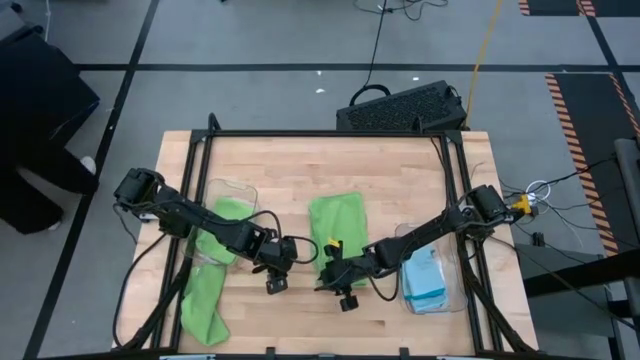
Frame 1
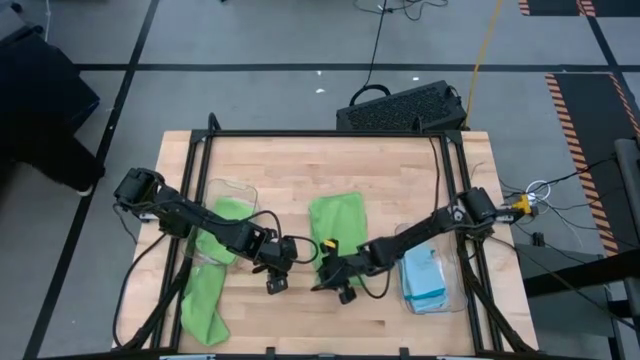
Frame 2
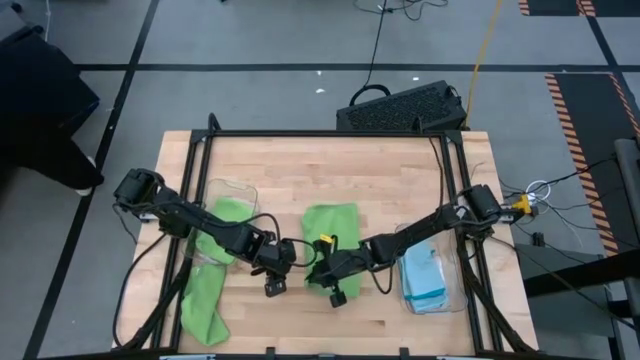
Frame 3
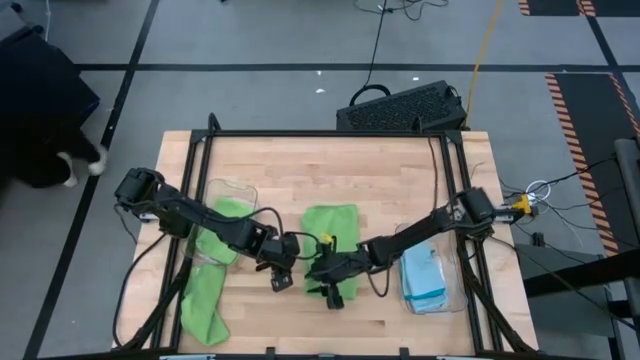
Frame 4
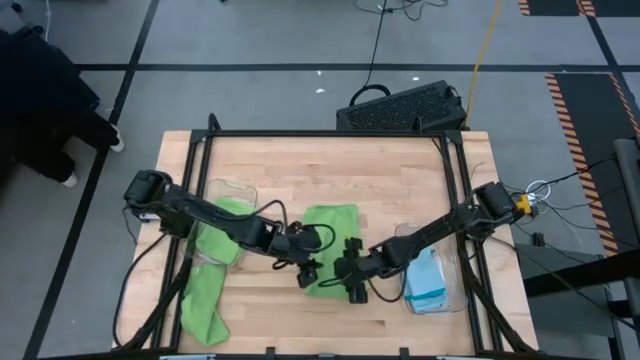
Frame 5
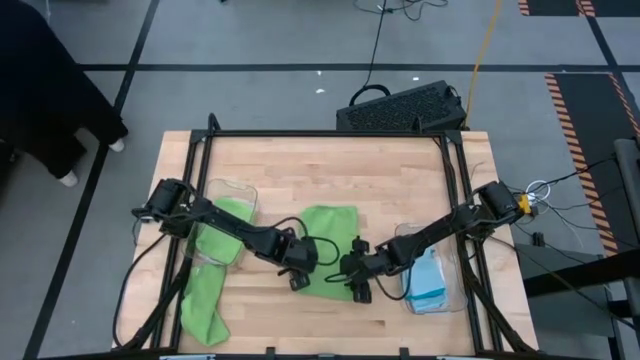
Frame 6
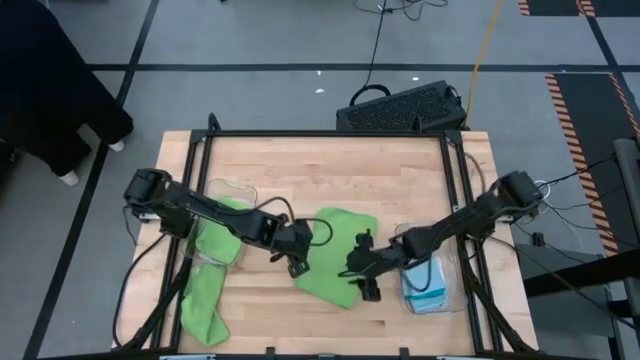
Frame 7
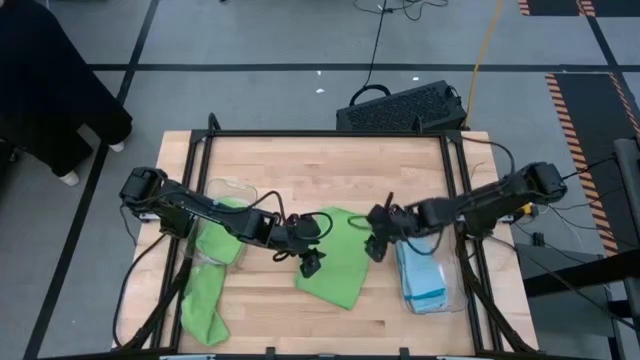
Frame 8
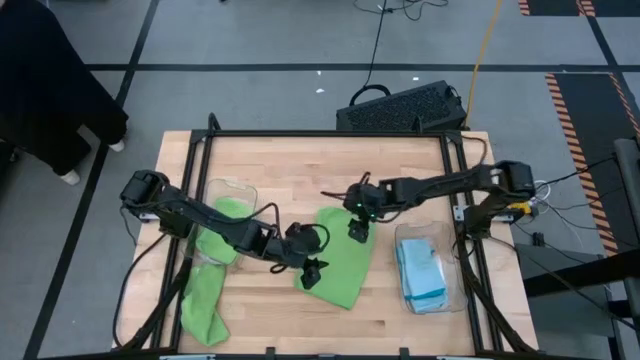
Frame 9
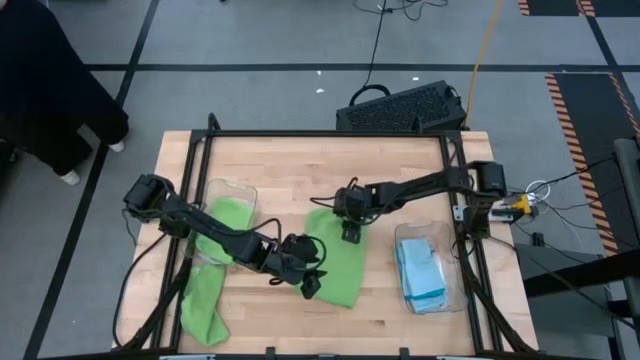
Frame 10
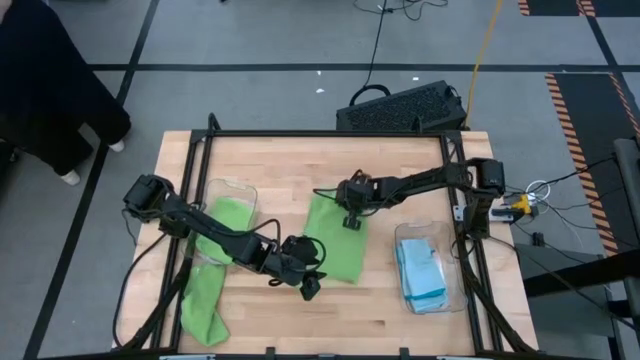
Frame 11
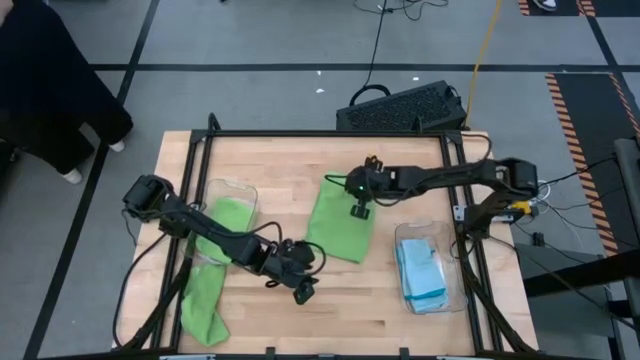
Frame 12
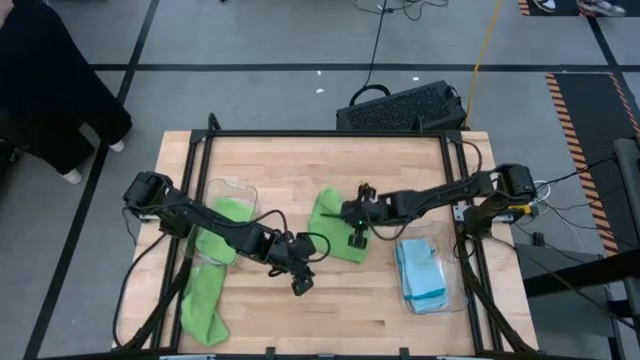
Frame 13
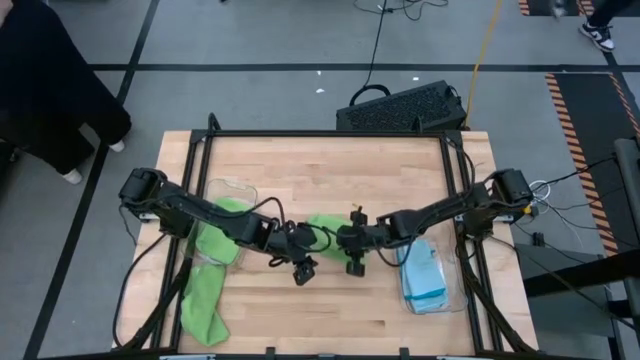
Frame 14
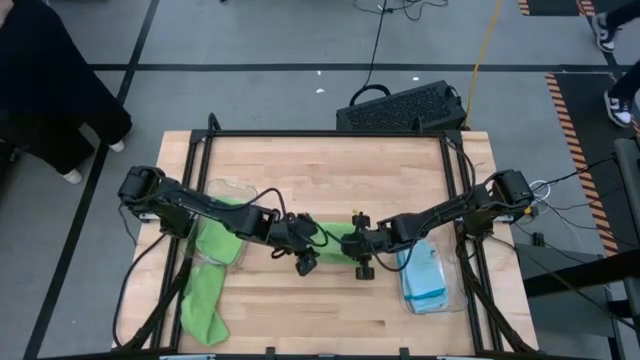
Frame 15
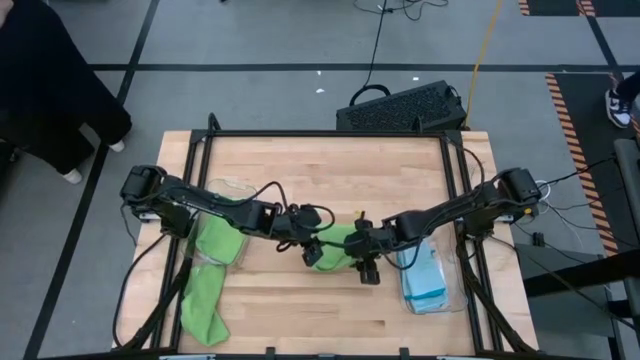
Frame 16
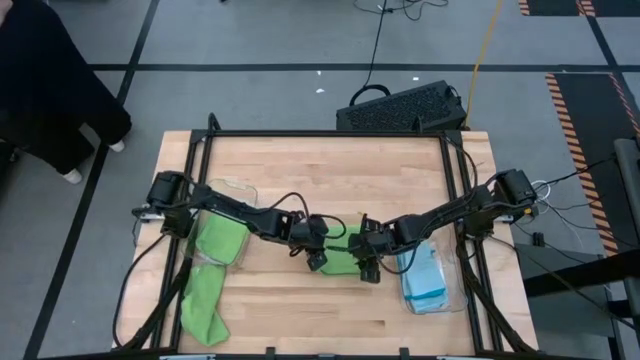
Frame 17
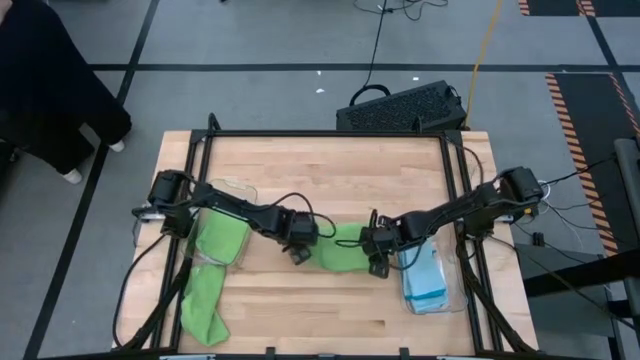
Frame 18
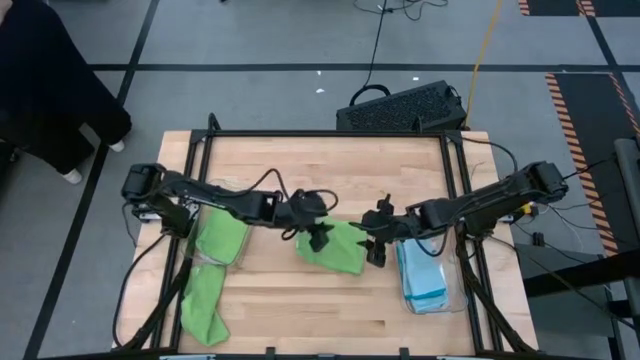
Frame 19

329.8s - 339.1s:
Task: Sort microfiber towel by color & place in baskets
Fold the right green microfiber towel

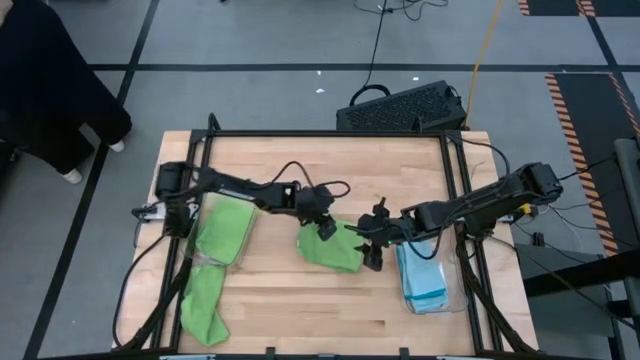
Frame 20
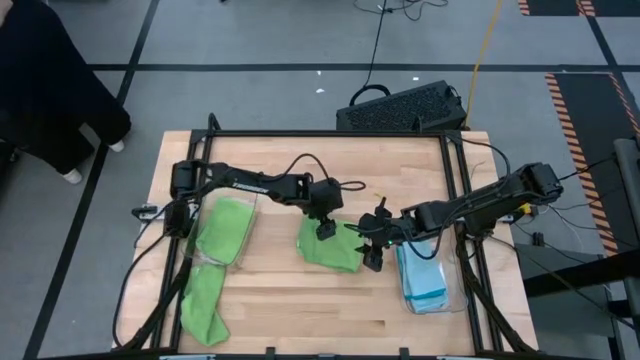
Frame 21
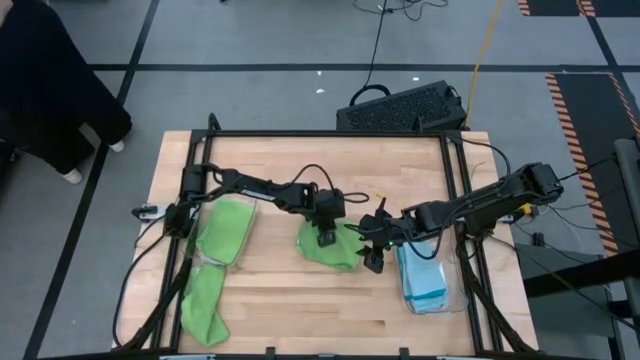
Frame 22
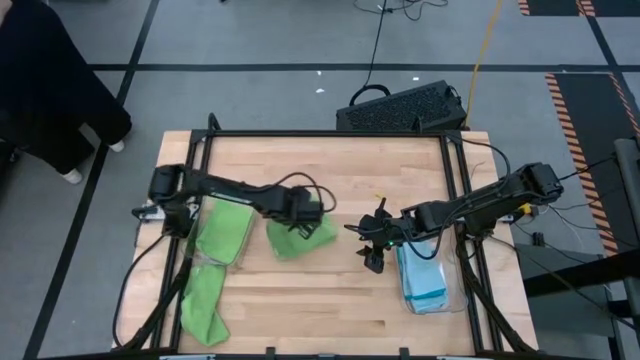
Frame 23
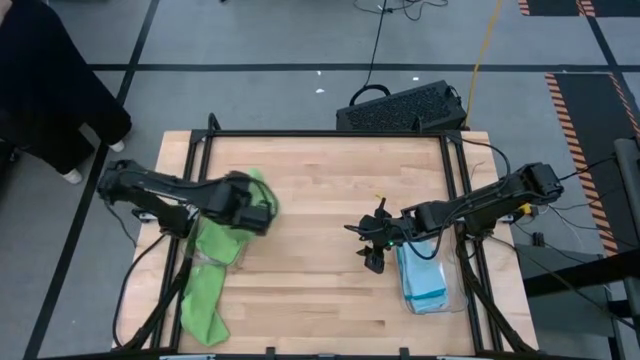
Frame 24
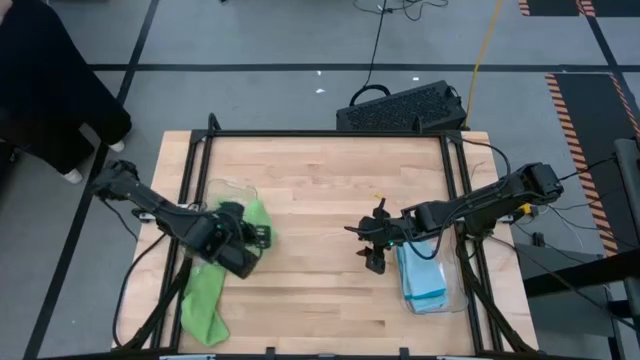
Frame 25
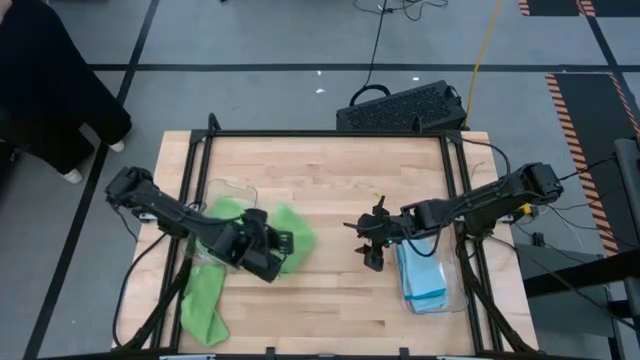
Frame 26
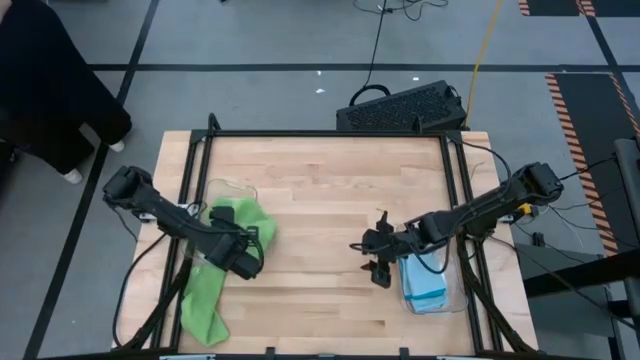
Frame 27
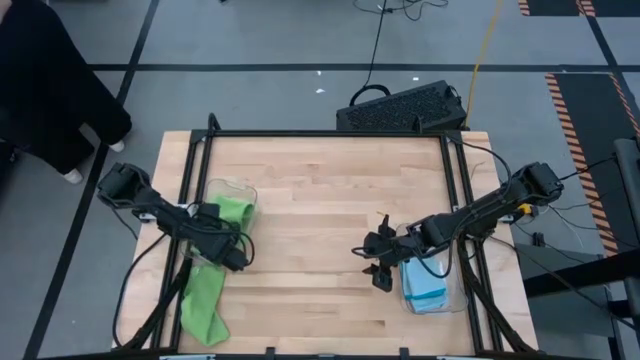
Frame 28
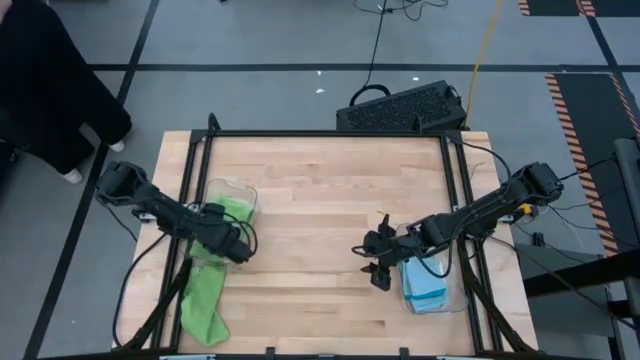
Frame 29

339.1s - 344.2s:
Put the folded green microfiber towel into the left transparent bin

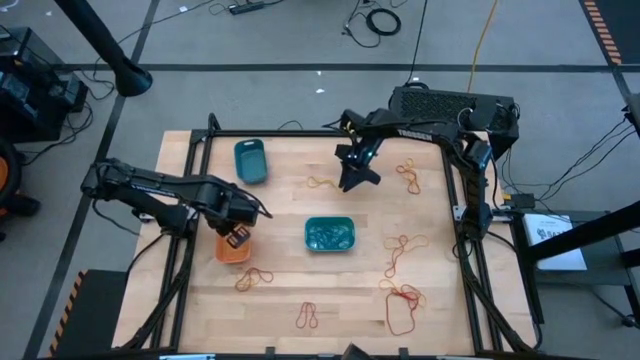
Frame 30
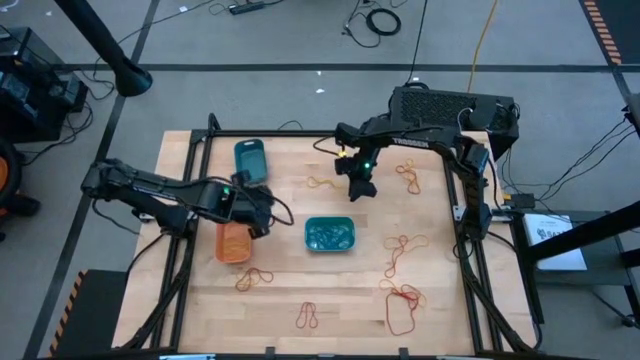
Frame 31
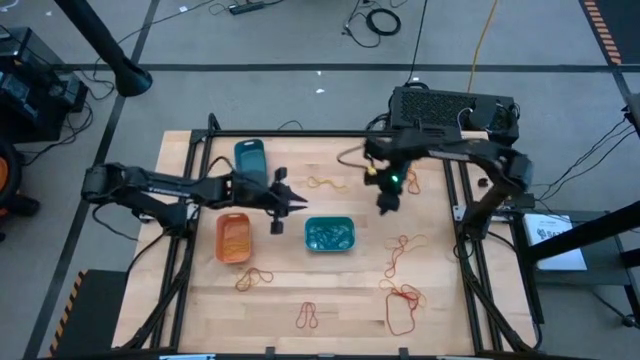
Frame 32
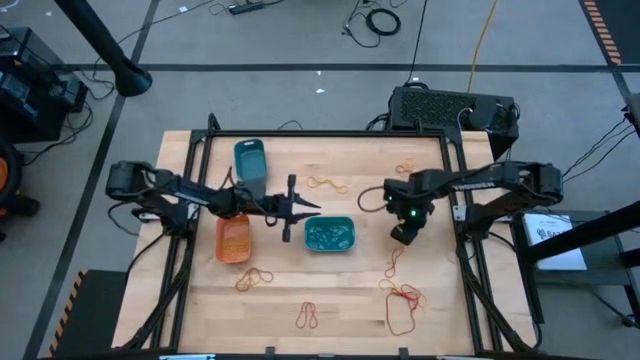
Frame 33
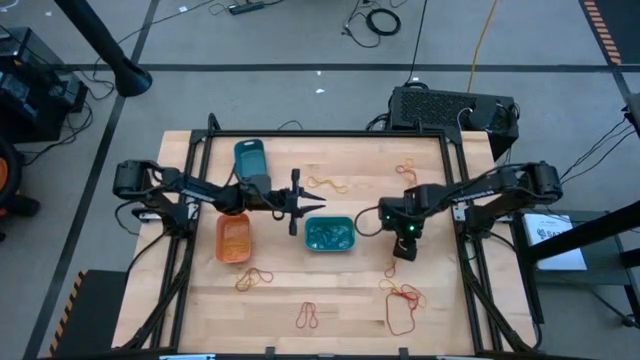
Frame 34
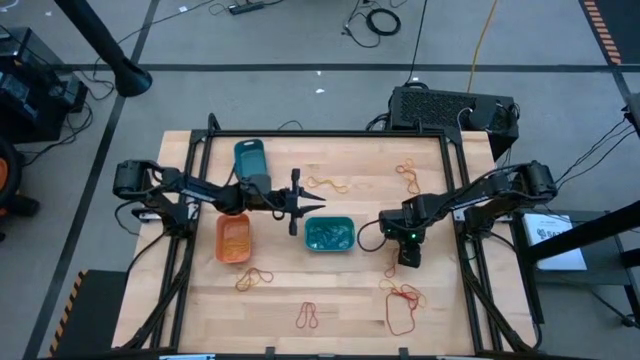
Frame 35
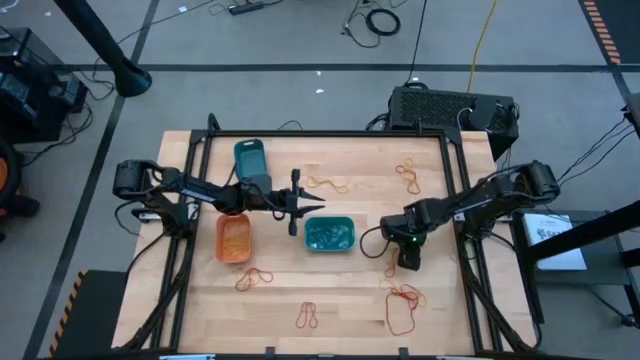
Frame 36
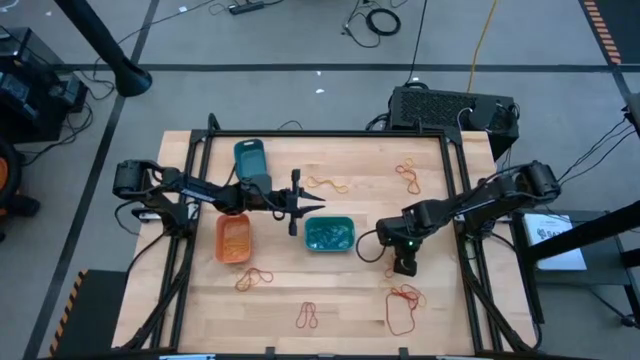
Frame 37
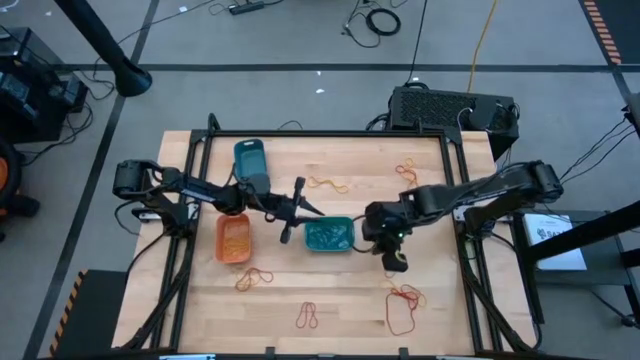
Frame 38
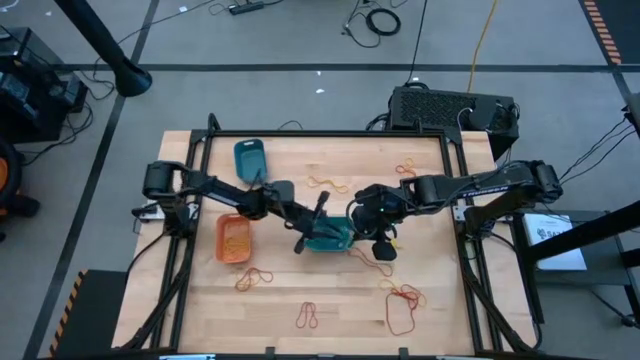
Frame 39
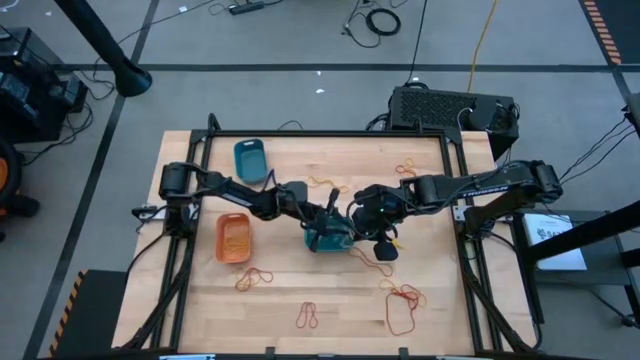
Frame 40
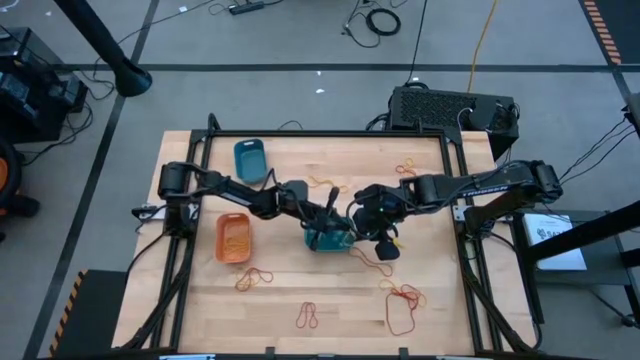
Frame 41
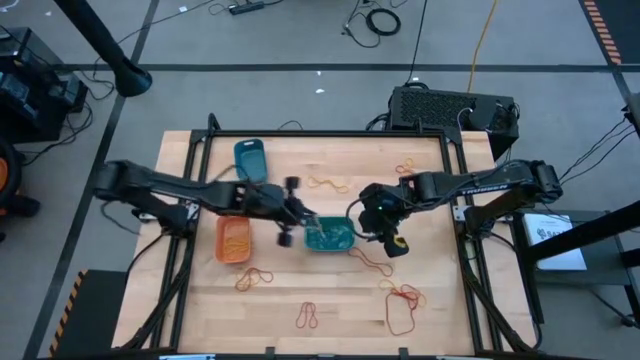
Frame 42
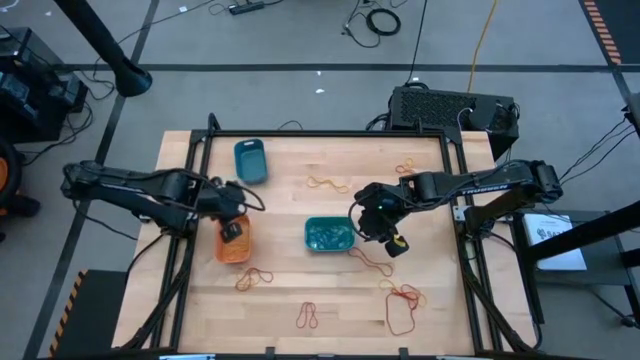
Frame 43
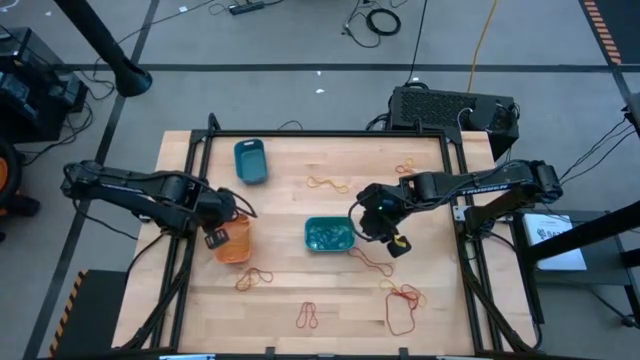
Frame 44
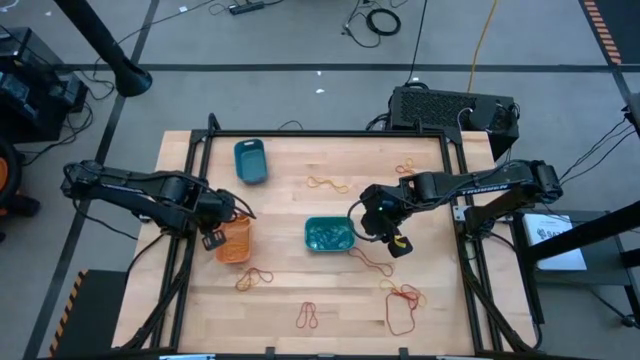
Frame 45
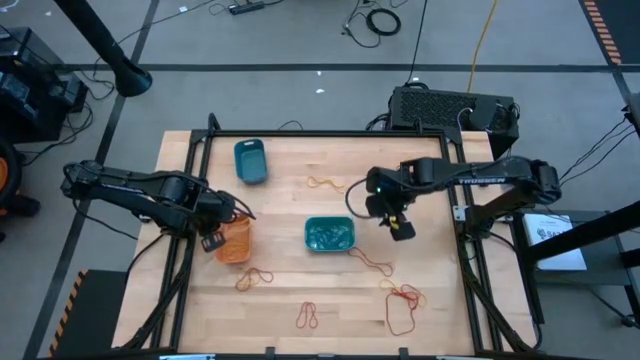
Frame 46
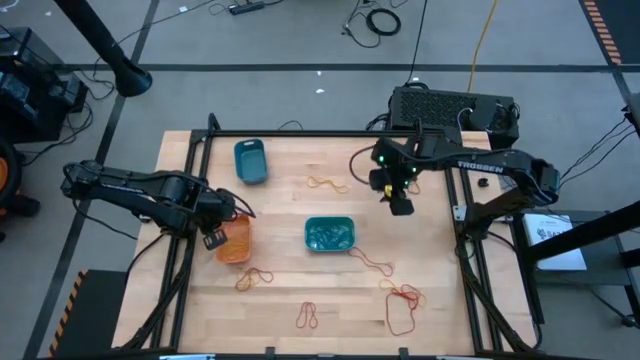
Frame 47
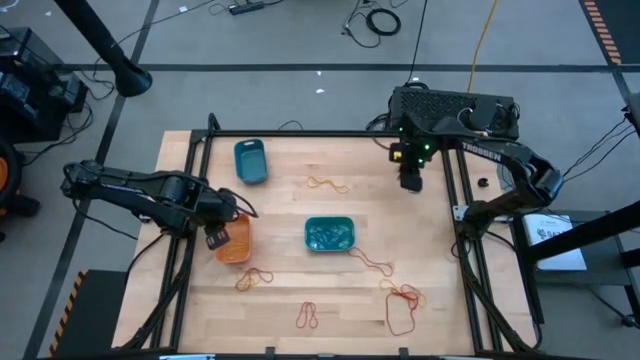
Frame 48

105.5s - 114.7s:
Task: Sort rubber bands into baskets
Put the yellow rubber band into the orange bin
